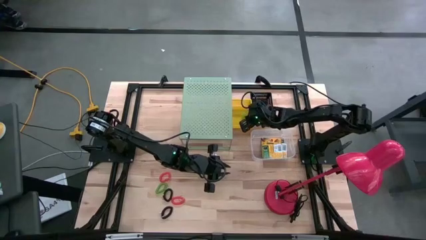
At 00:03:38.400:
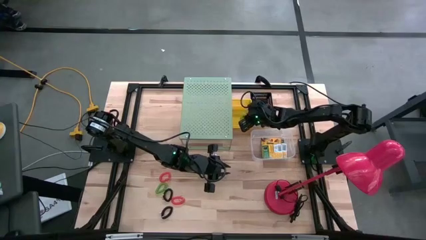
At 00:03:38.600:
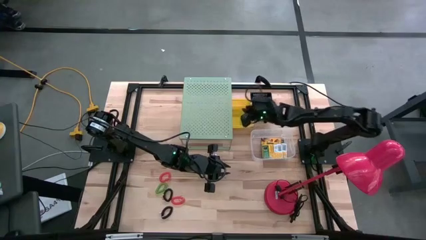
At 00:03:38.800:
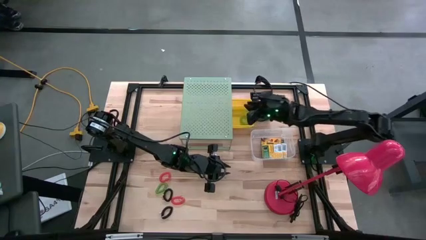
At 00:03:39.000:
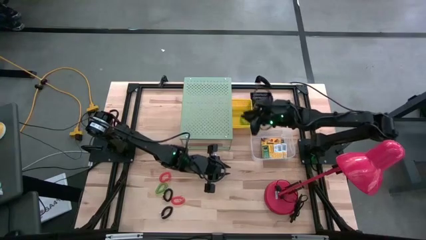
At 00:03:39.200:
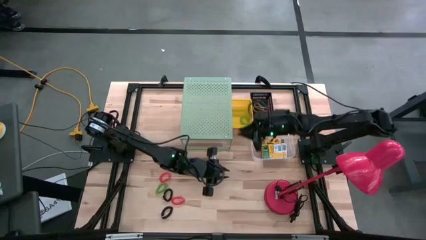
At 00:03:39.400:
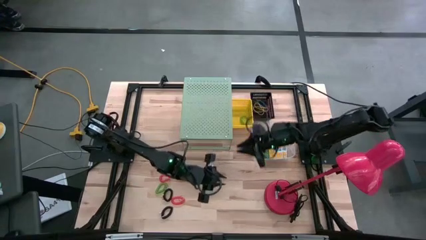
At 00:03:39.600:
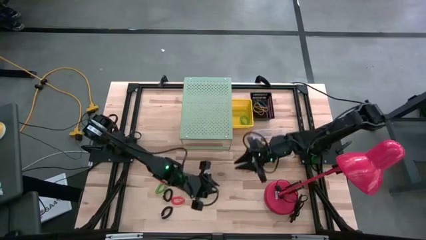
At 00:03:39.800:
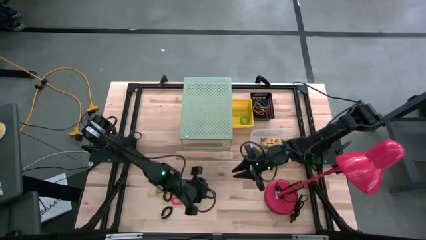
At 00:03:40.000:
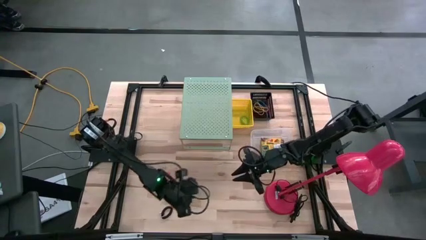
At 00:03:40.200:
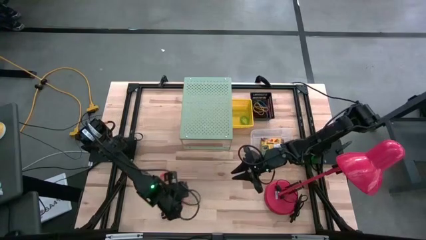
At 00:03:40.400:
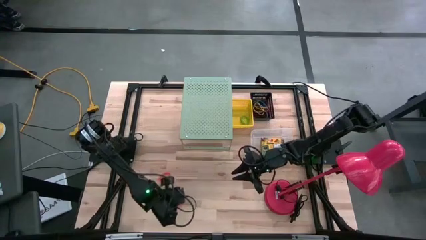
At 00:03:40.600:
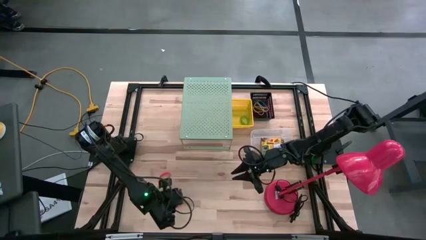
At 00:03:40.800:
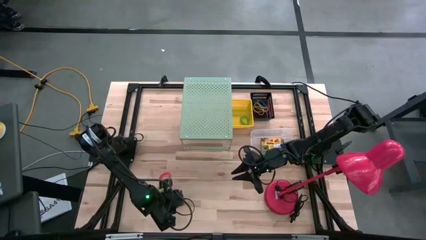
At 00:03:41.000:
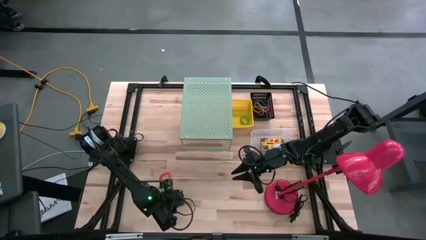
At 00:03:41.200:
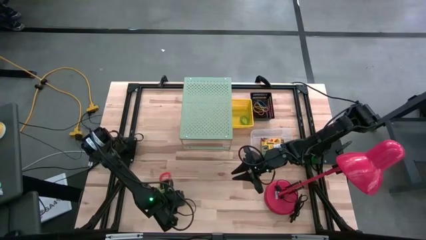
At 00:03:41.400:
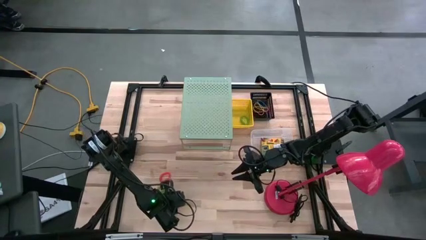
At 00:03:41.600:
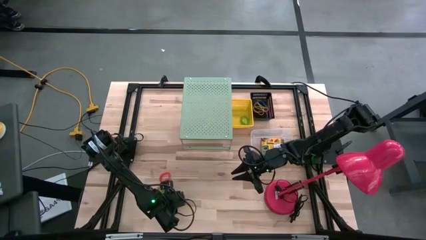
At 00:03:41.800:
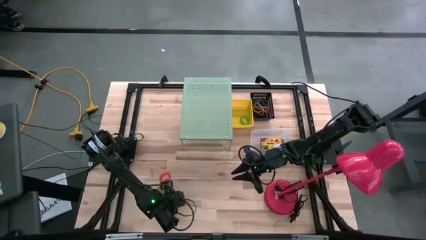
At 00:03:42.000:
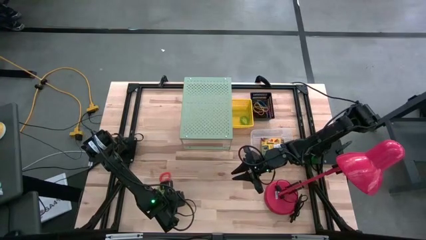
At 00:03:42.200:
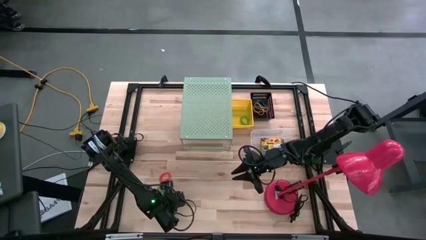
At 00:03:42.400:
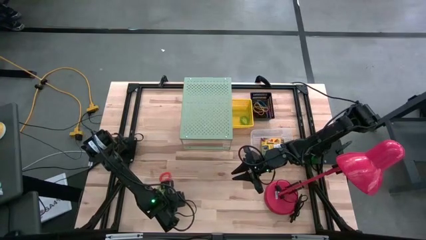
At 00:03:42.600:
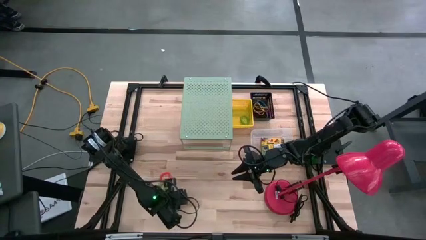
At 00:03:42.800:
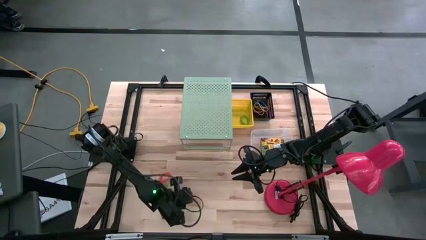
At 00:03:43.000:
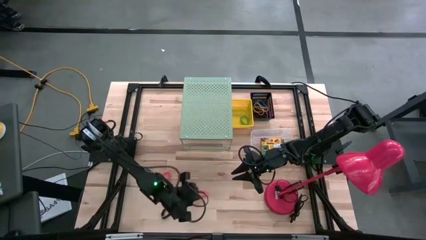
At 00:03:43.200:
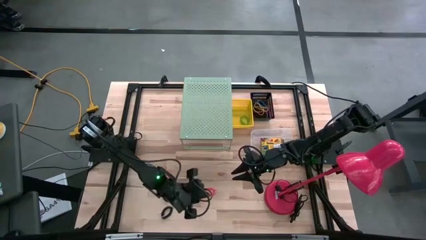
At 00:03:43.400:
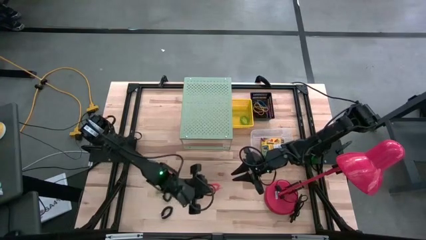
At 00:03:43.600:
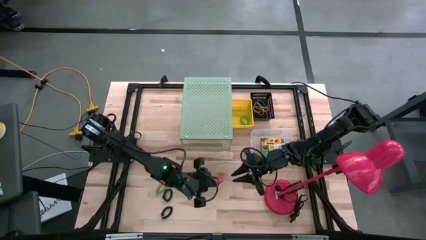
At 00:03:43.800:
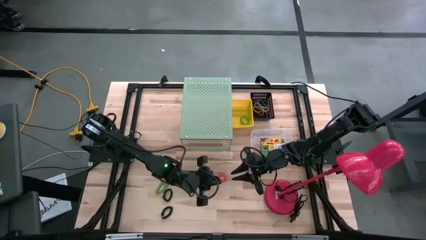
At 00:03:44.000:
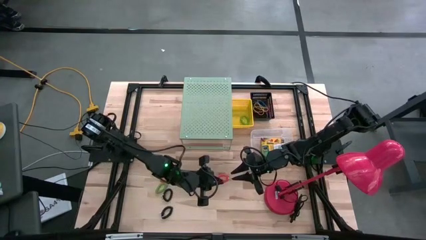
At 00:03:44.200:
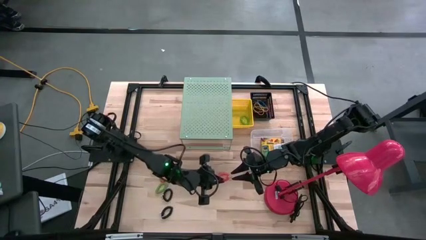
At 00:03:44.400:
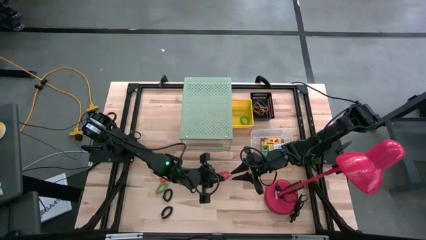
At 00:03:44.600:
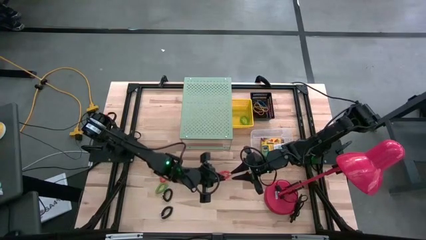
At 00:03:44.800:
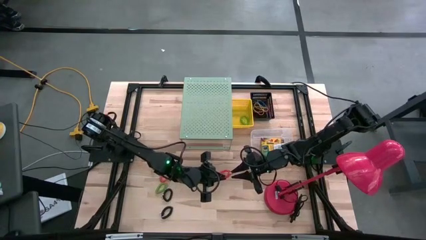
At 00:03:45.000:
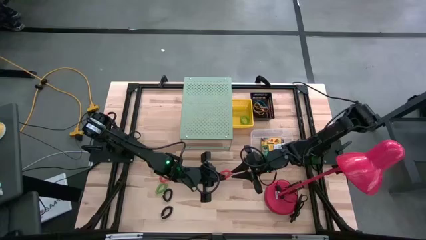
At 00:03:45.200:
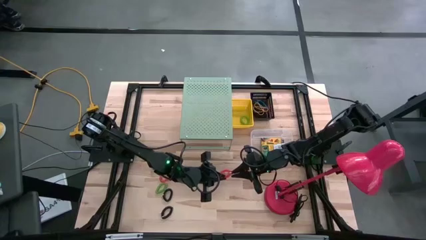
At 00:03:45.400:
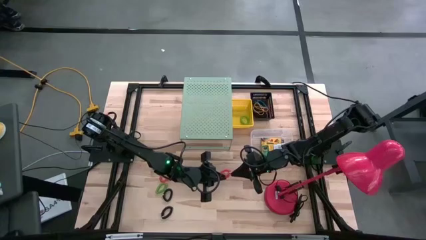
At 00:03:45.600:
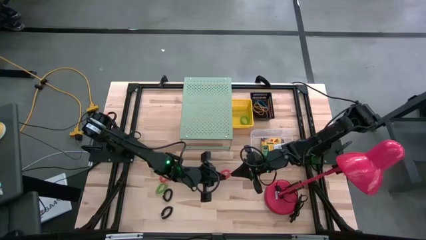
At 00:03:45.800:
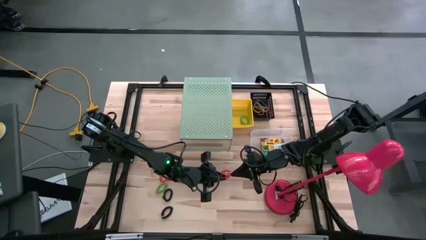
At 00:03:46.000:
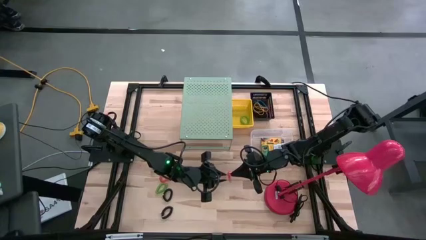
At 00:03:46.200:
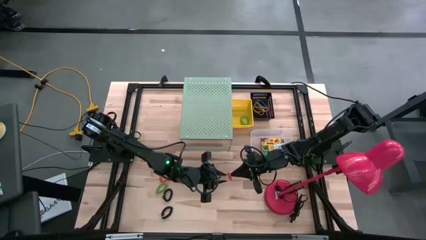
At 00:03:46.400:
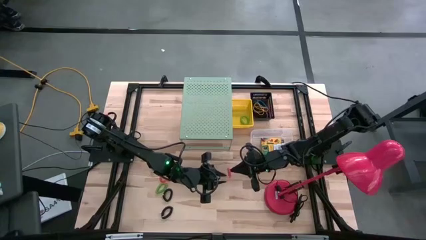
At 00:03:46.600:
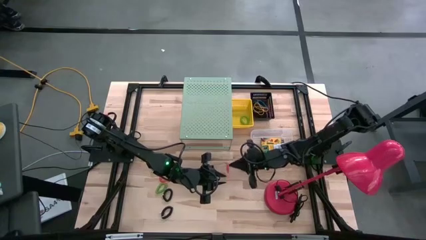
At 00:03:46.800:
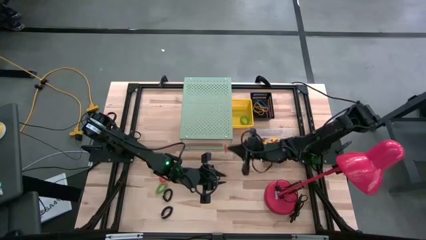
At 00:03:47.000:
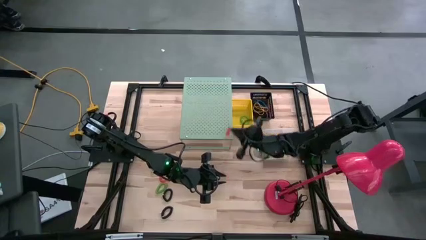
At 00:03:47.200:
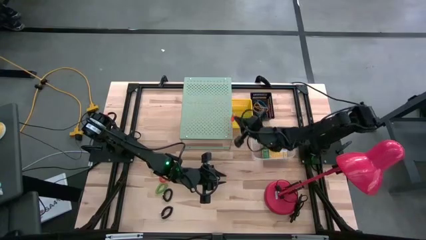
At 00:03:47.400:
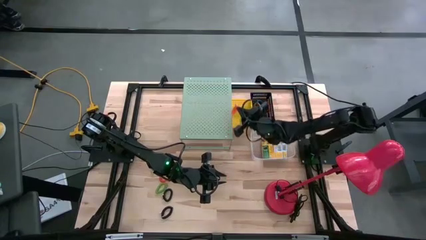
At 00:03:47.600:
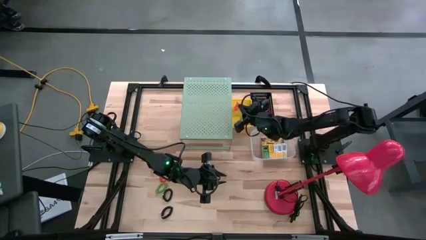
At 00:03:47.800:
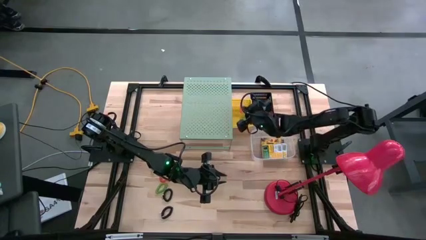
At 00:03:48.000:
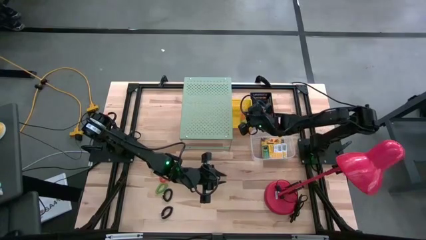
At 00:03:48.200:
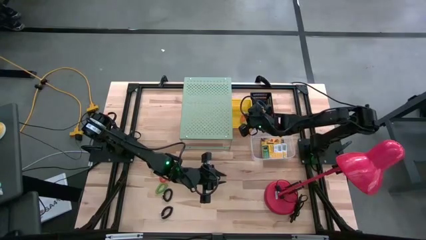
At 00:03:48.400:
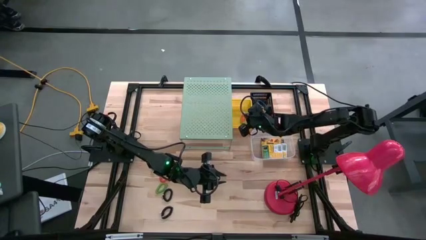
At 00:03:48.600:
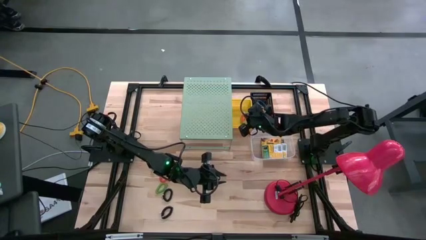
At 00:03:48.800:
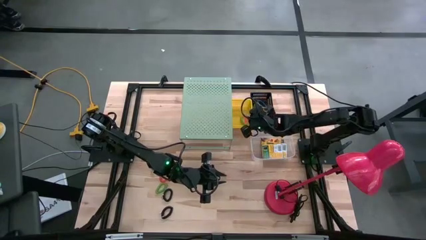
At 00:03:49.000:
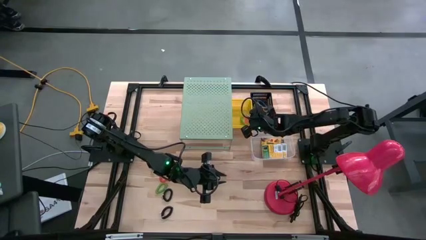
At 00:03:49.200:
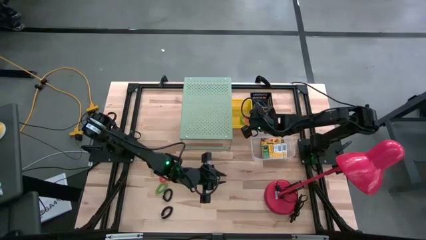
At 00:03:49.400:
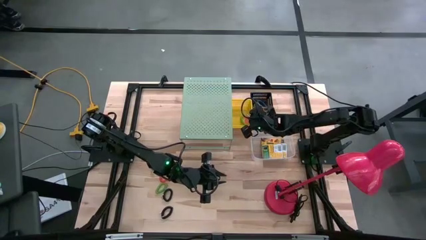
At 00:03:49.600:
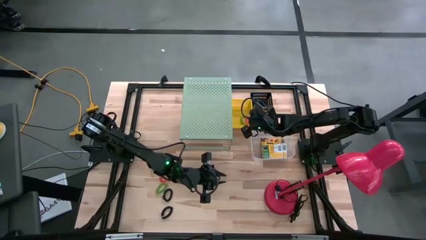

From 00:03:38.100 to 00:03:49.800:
Task: Pick & Place Office Desk Supplies
Put the orange spring keychain into the yellow bin
